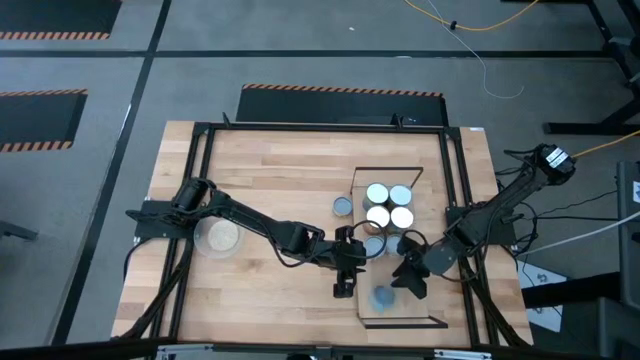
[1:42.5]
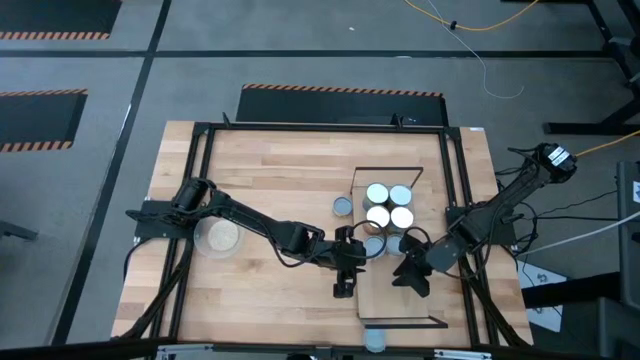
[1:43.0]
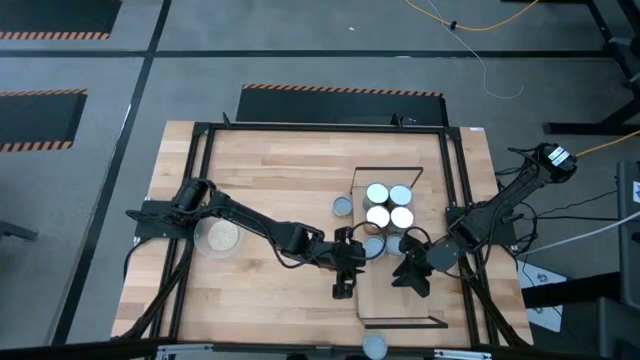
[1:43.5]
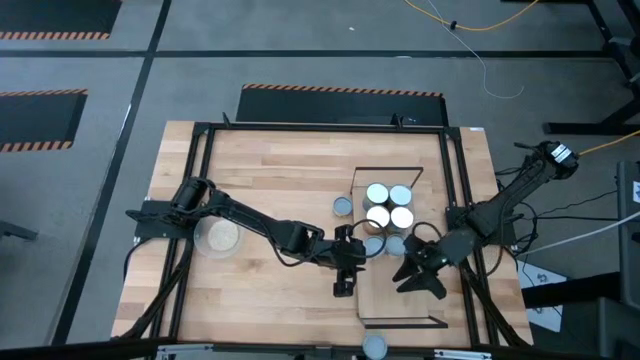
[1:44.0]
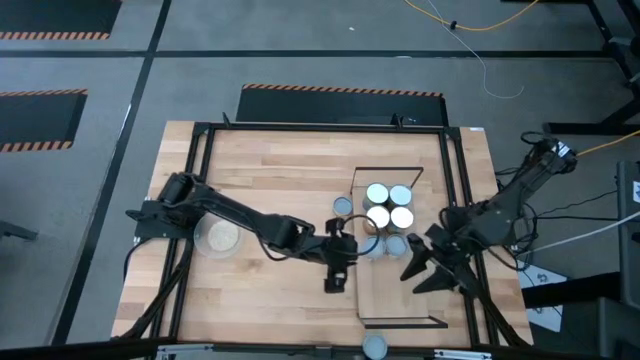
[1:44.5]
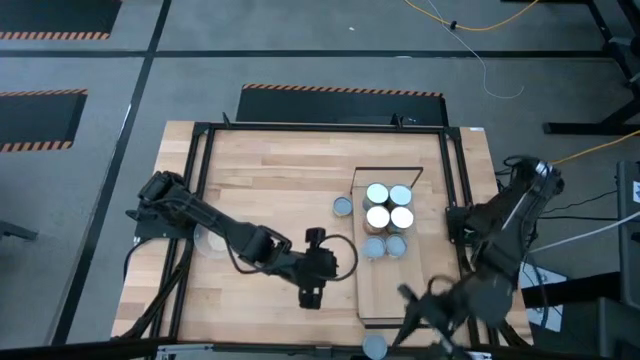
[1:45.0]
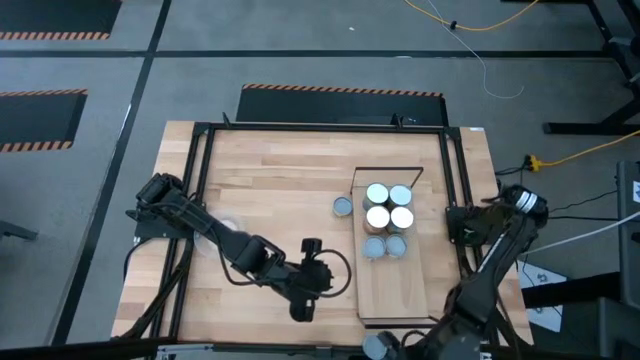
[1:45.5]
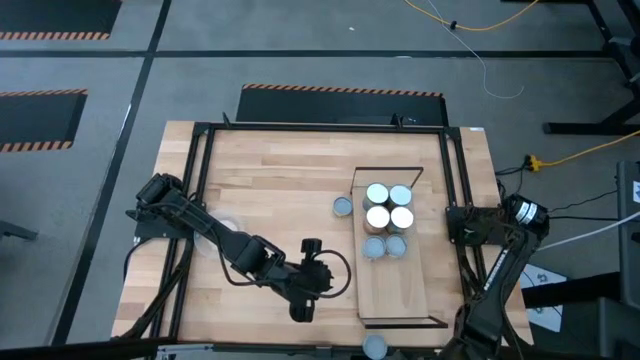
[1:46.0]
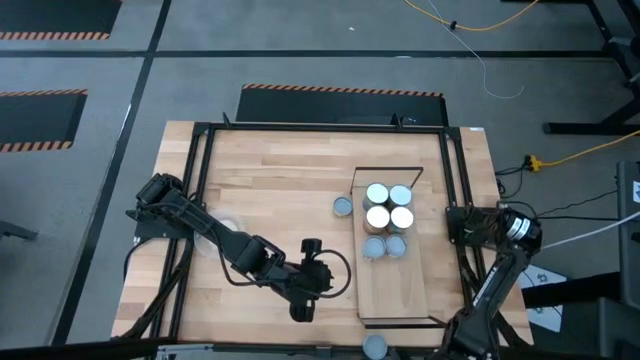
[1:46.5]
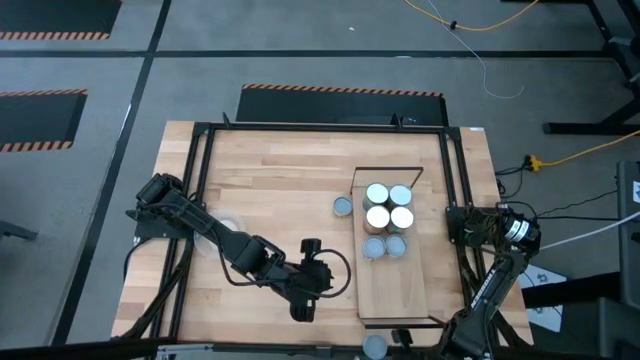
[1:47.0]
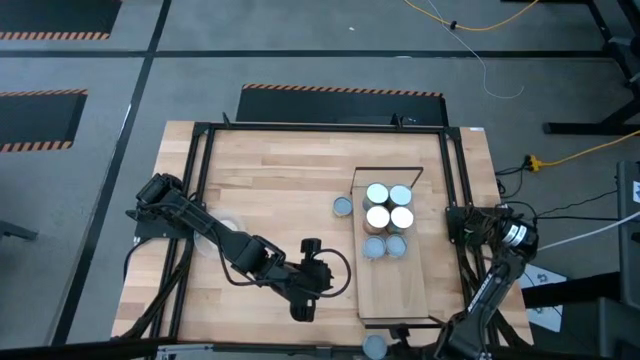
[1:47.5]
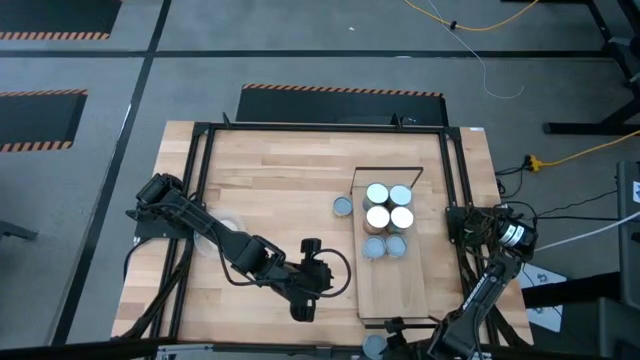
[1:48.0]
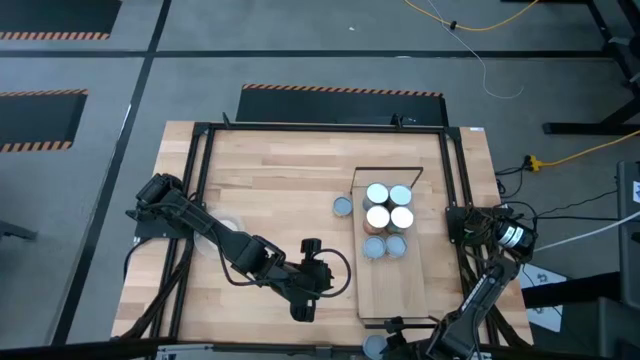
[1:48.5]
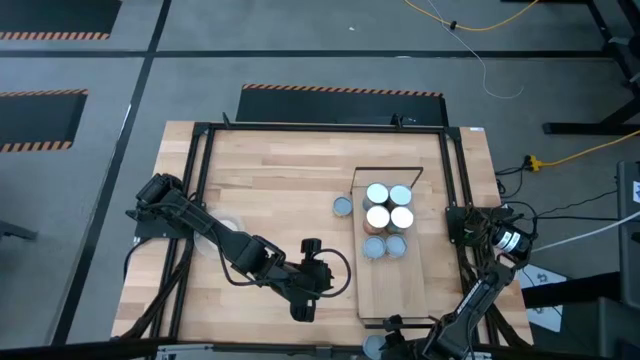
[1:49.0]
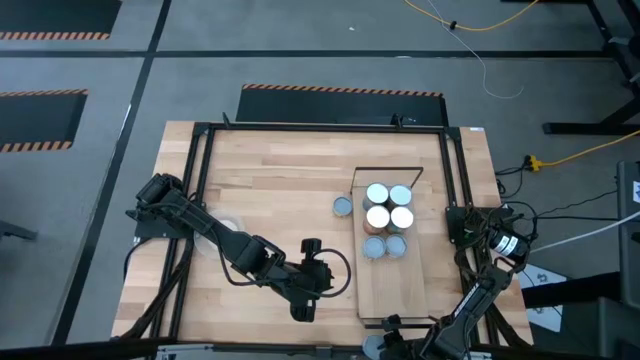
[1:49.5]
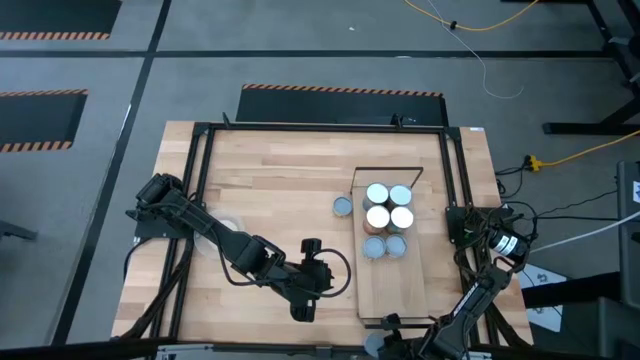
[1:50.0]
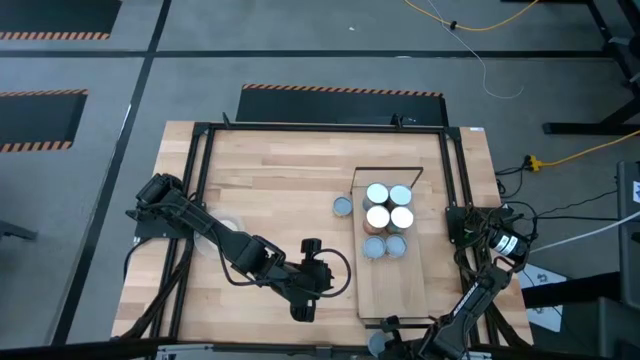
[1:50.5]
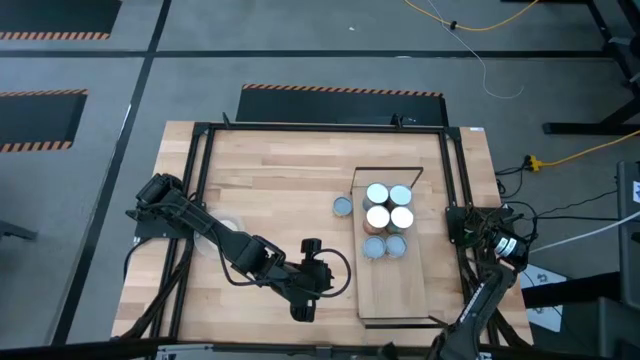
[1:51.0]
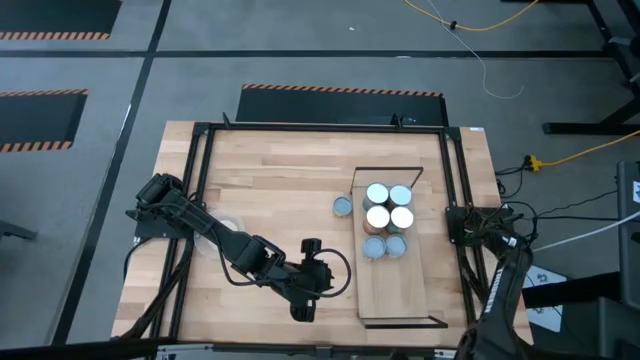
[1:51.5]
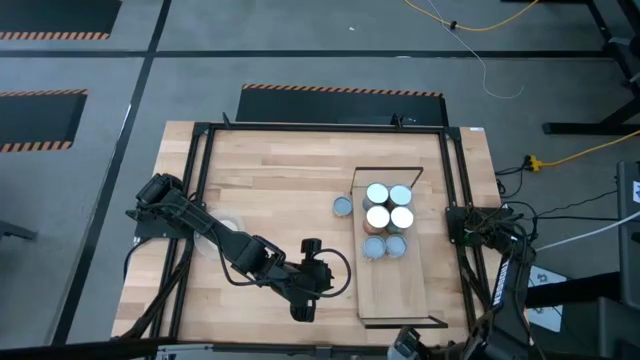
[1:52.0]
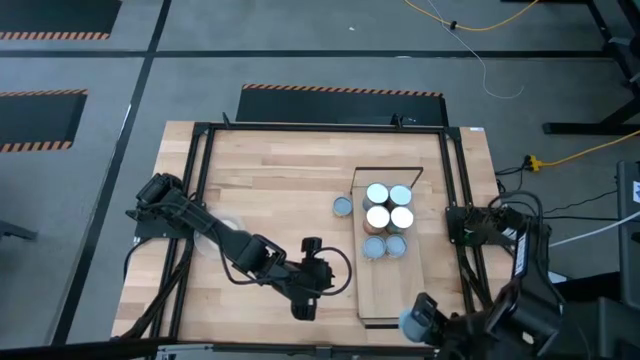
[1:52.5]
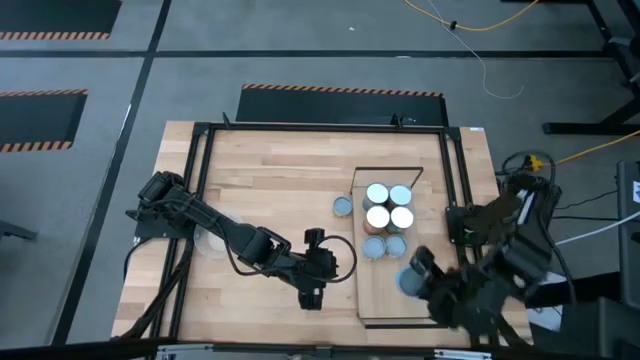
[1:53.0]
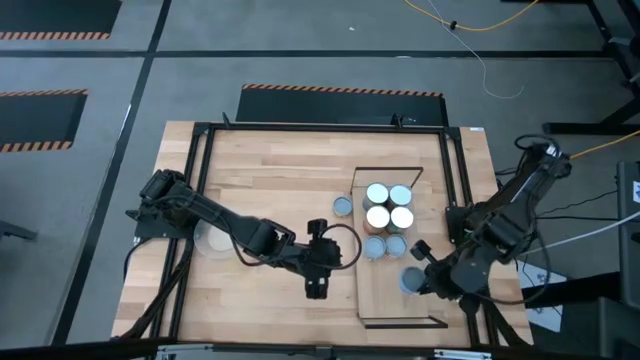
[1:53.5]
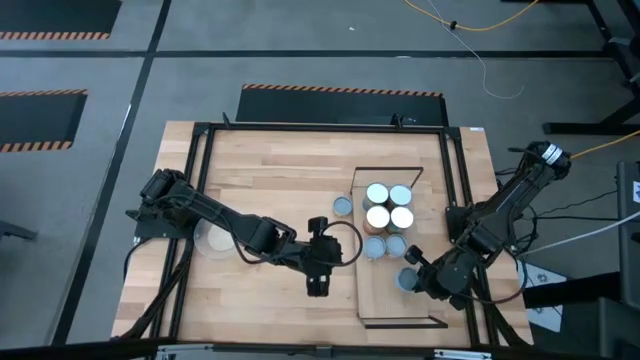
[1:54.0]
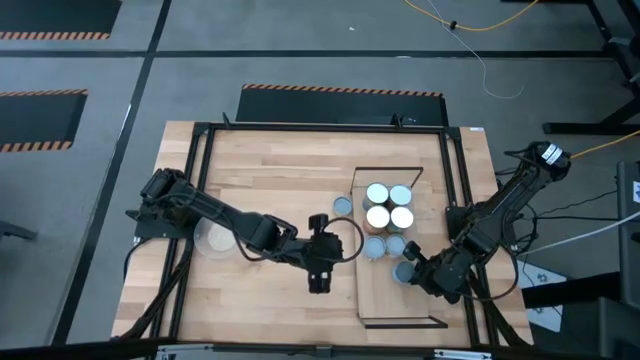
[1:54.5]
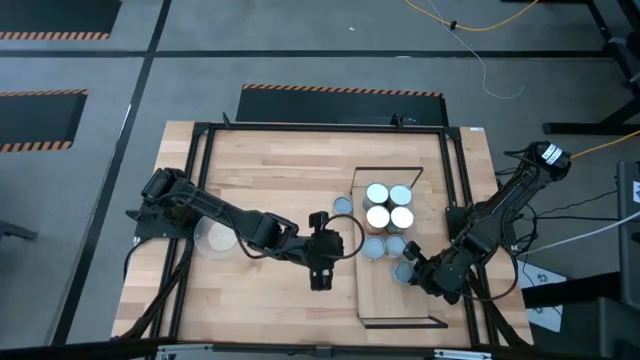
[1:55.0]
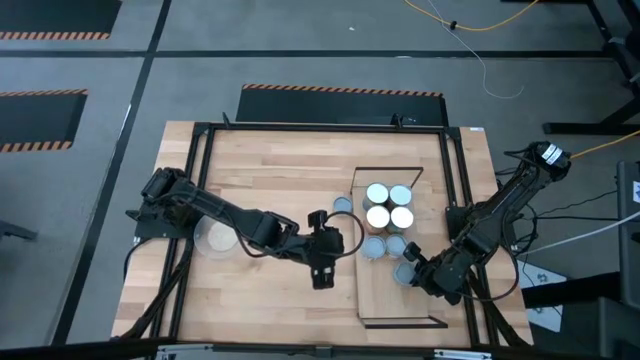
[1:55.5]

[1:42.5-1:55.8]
Task: Pick and place cans onto a shelf
Put the blue tuna can onto the shelf

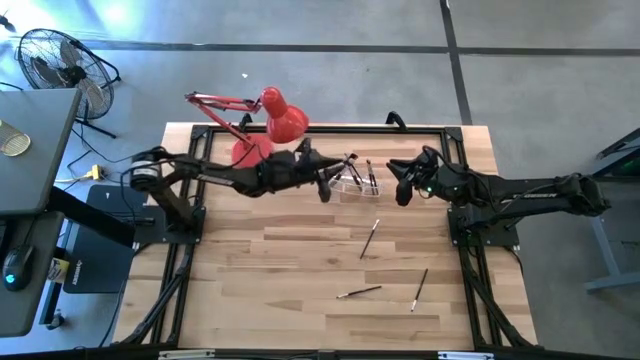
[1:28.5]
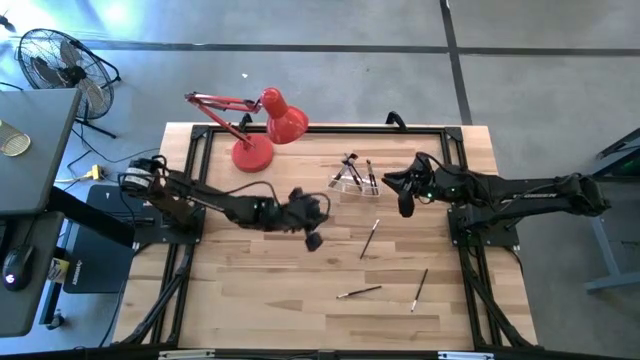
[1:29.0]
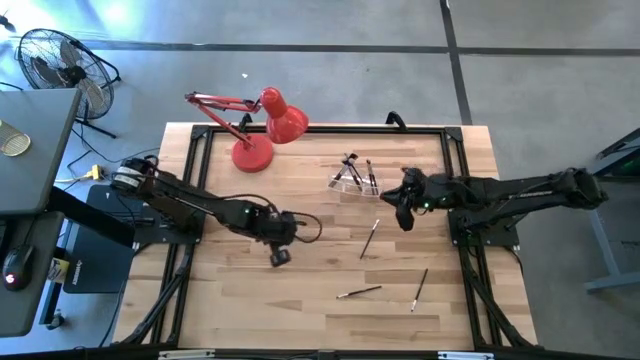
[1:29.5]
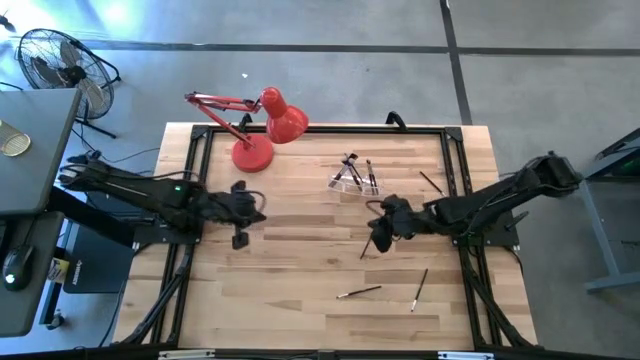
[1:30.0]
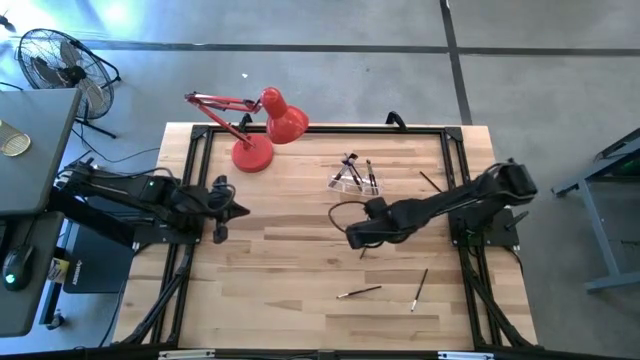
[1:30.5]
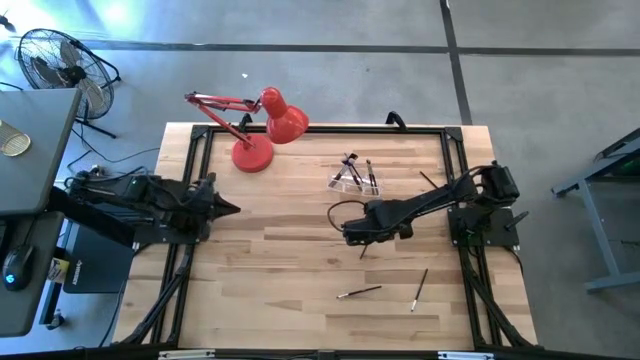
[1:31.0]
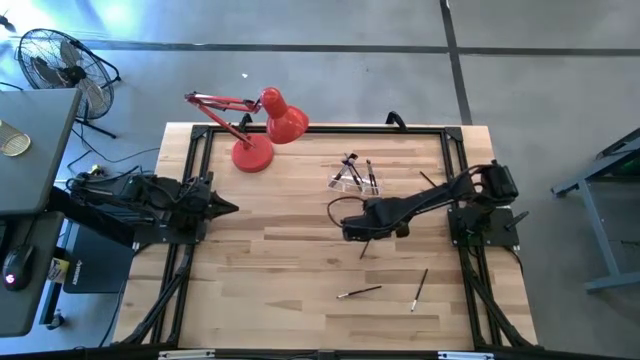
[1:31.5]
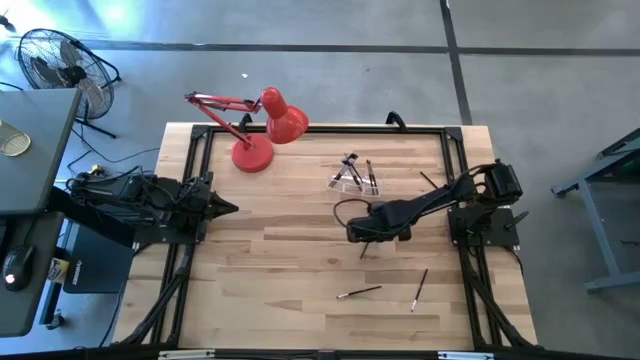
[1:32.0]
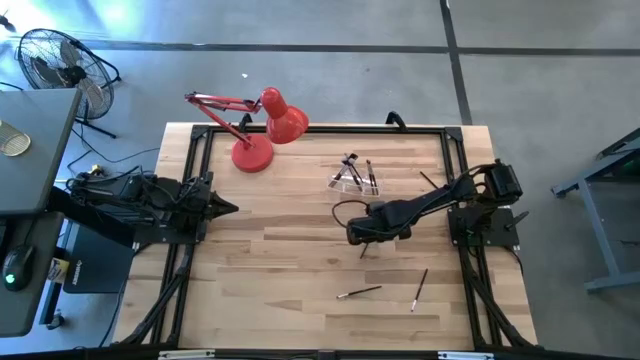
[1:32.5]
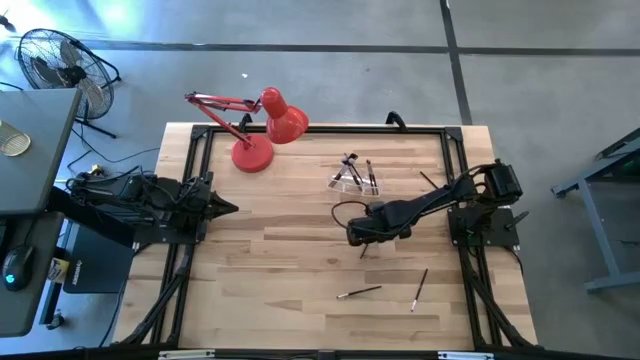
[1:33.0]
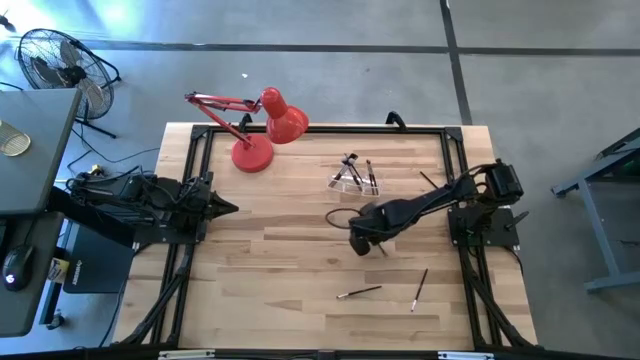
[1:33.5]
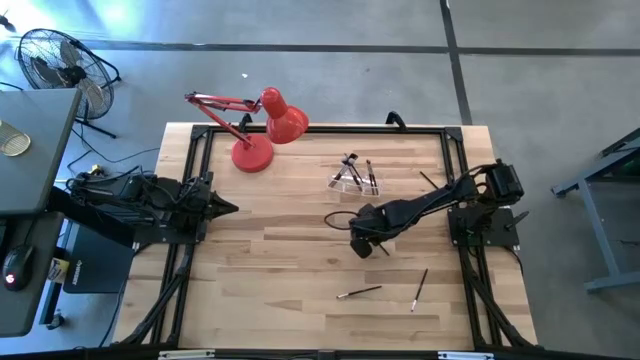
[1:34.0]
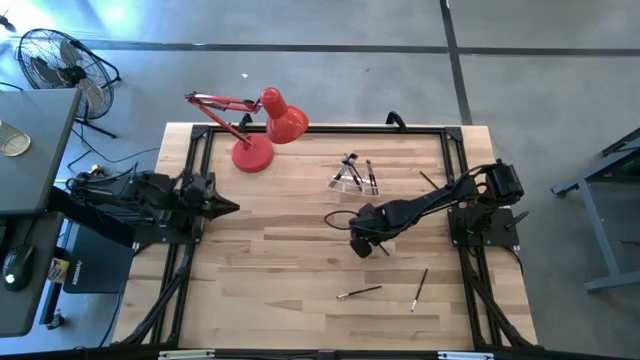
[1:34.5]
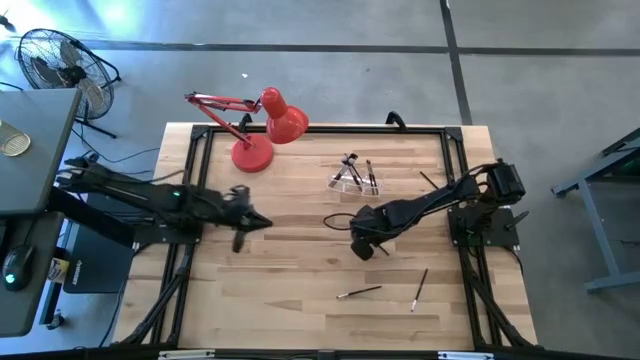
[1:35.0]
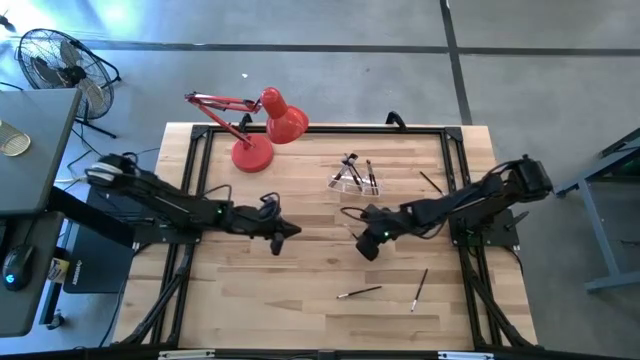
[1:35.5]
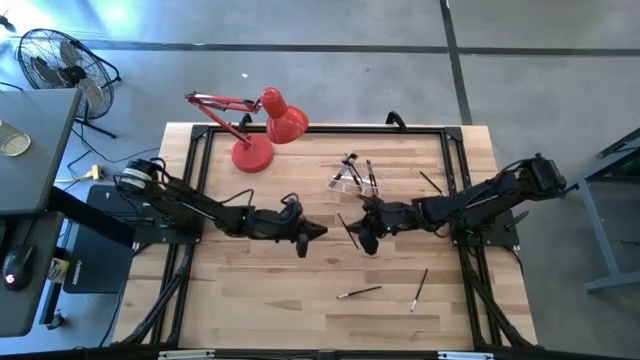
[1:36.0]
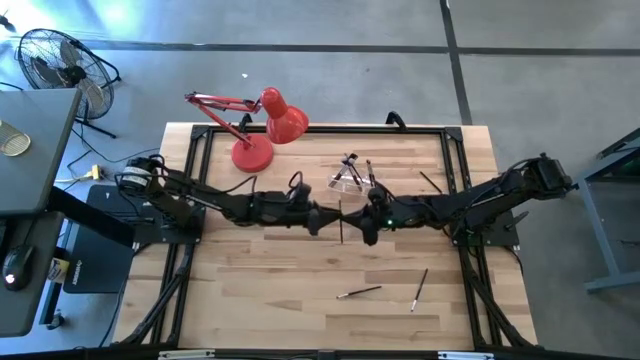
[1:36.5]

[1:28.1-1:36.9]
Task: Put items in baskets/containers
Put the eyeshadow brush into the transparent organizer
